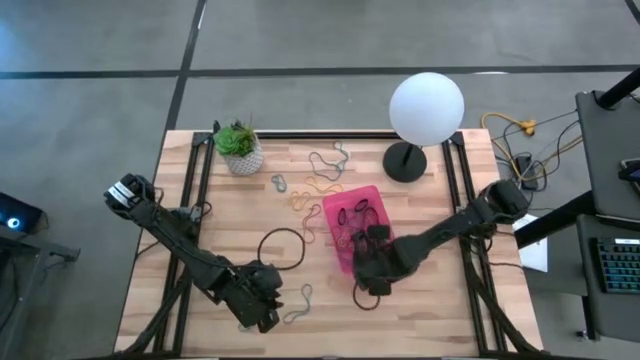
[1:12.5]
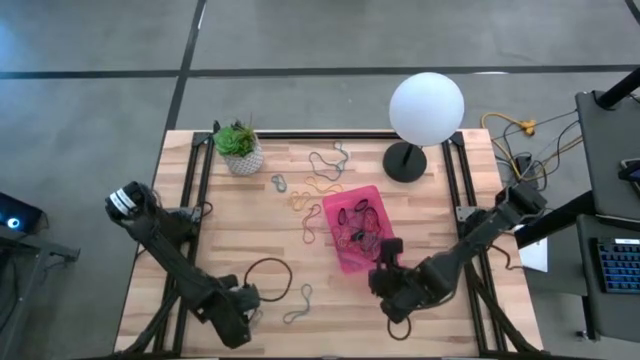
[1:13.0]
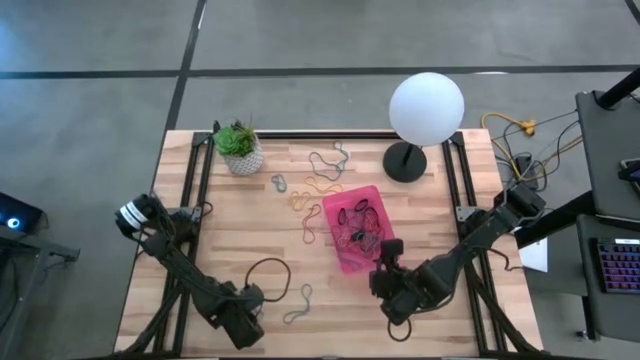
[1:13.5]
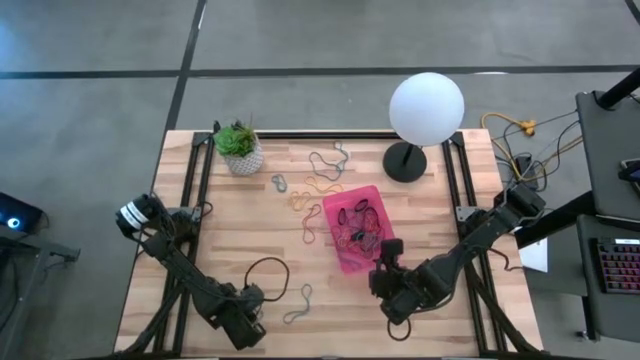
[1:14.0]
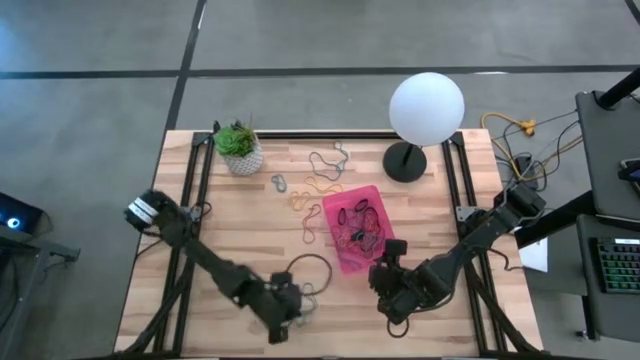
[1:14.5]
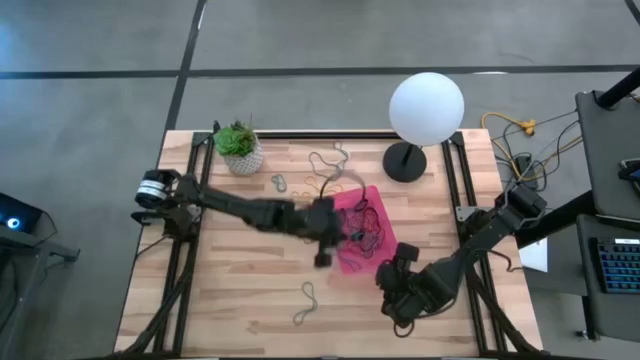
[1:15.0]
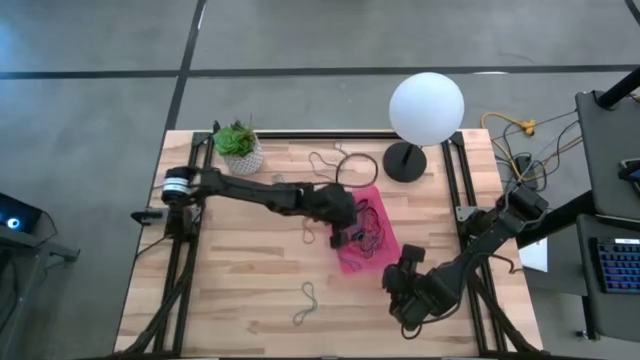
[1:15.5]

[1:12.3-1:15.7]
Task: Pick and place rubber bands into bin
Put the blue rubber band into the pink bin

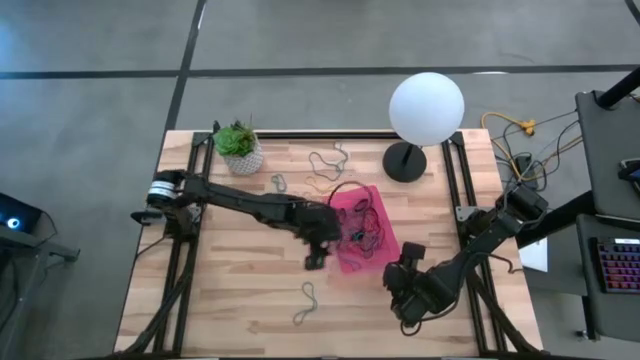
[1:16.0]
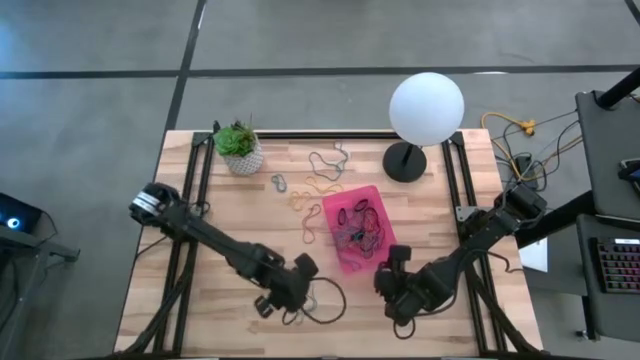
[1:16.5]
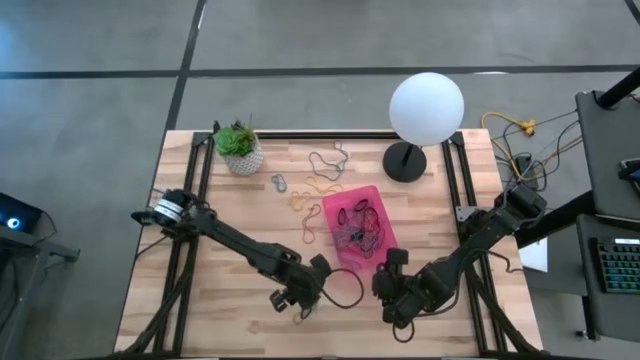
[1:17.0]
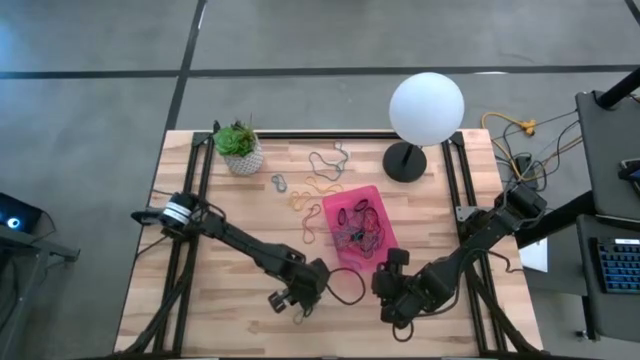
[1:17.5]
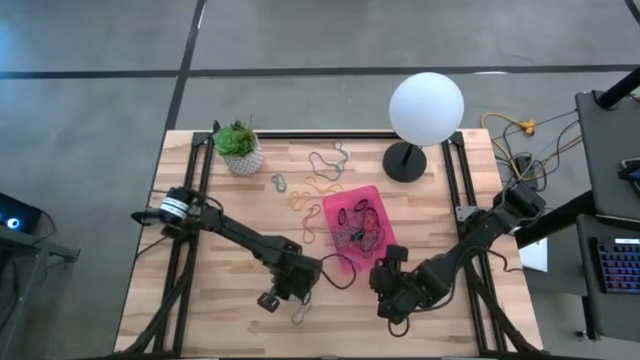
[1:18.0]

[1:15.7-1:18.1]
Put the blue rubber band into the pink bin

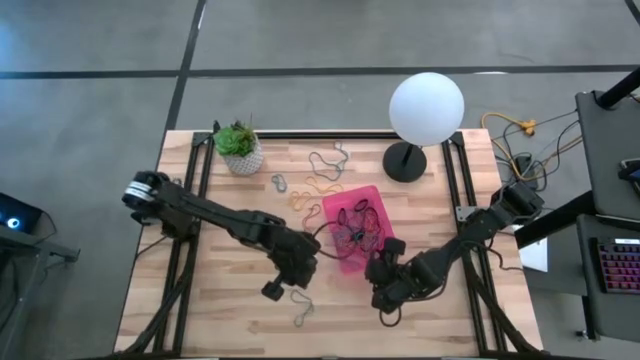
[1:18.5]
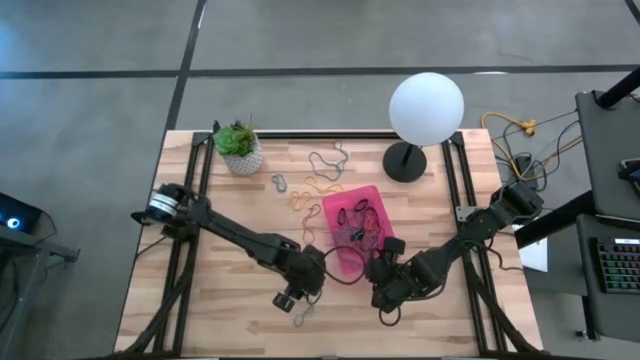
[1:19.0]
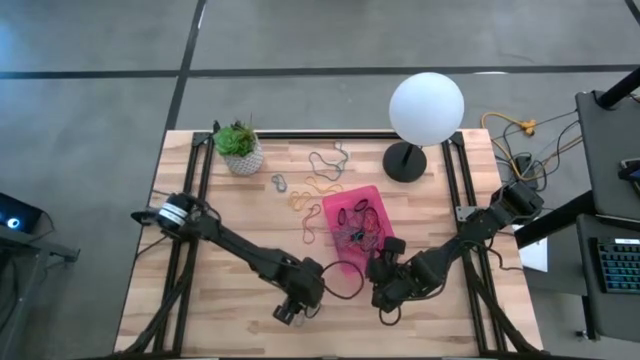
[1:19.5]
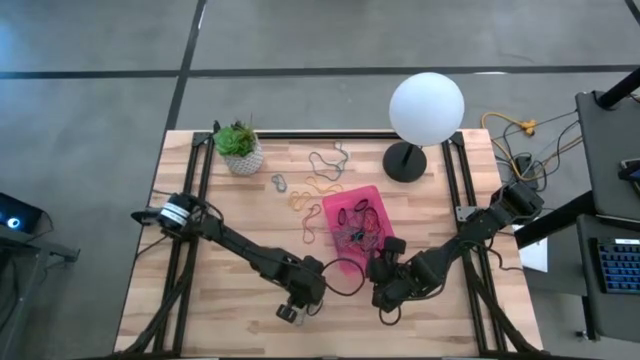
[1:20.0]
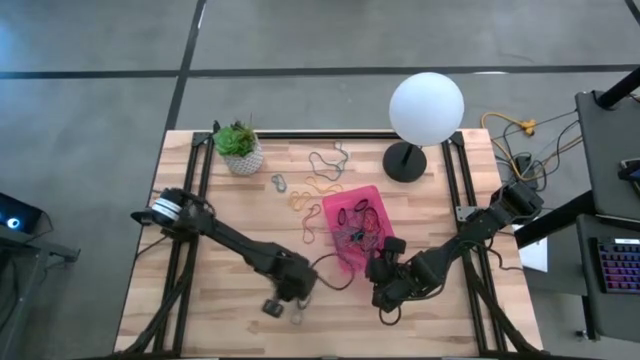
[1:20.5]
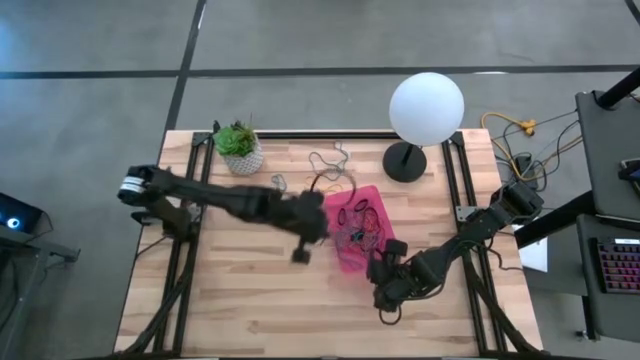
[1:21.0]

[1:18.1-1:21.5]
Put the blue rubber band into the pink bin

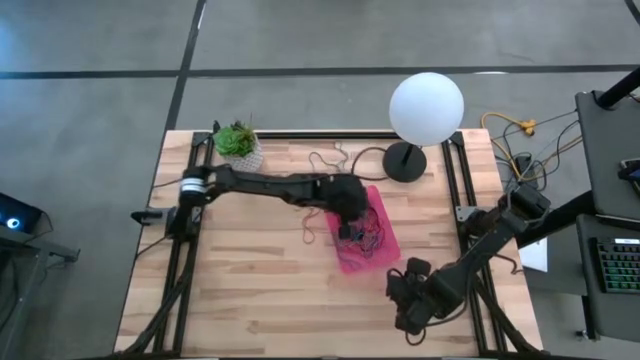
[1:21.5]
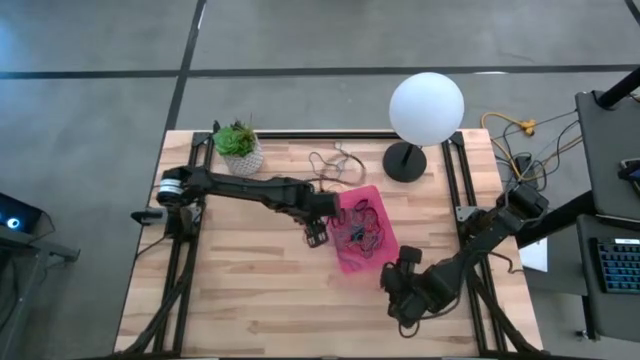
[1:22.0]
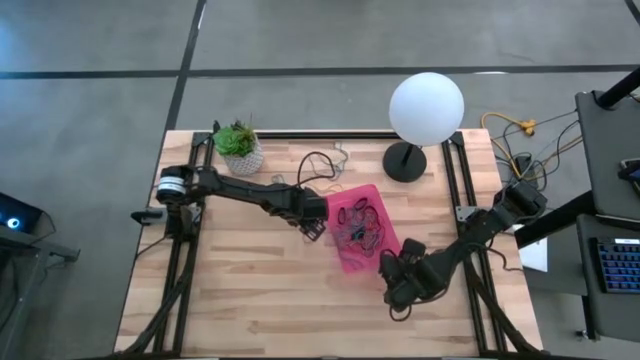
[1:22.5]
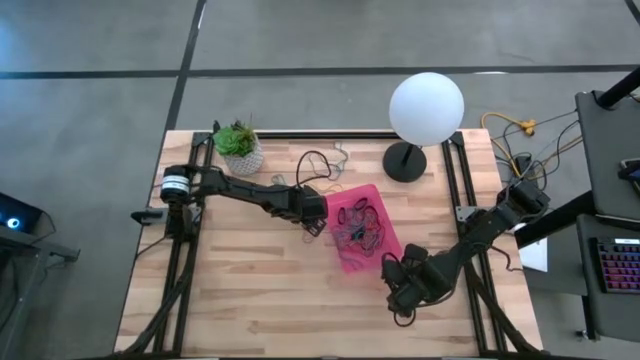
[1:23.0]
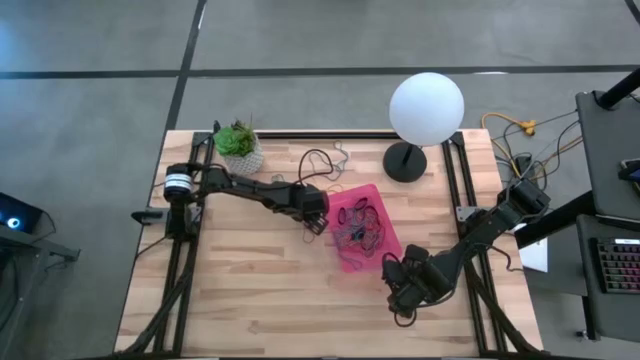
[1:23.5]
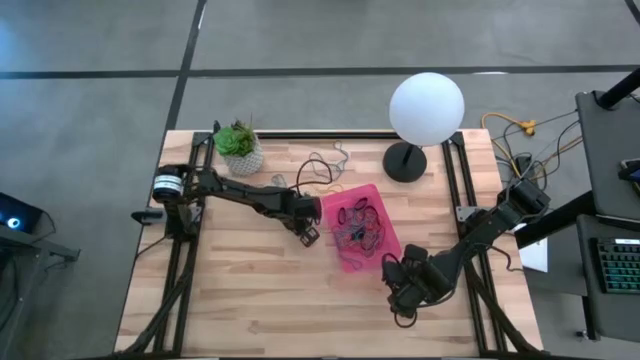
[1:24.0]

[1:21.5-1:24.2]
Put the red rubber band into the pink bin

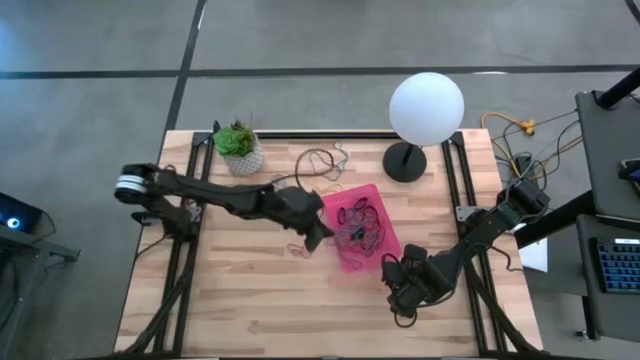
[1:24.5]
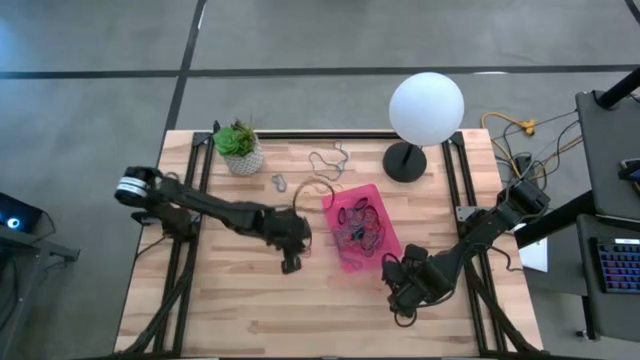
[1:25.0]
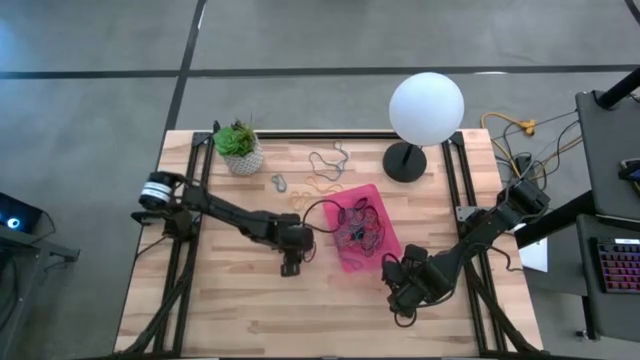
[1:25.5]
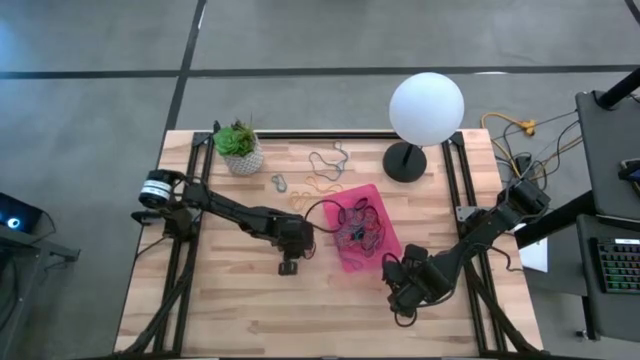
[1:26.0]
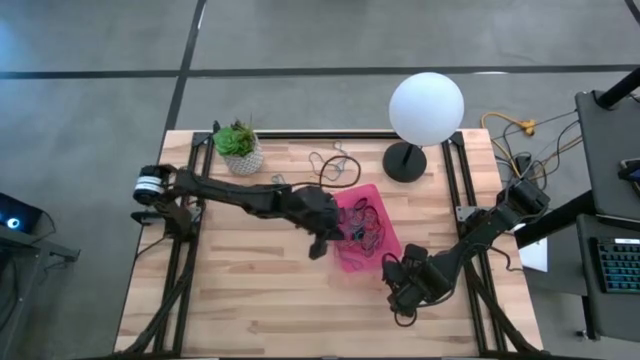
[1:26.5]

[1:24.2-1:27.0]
Put the red rubber band into the pink bin

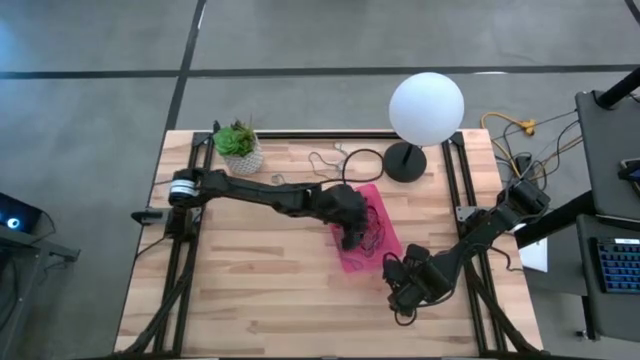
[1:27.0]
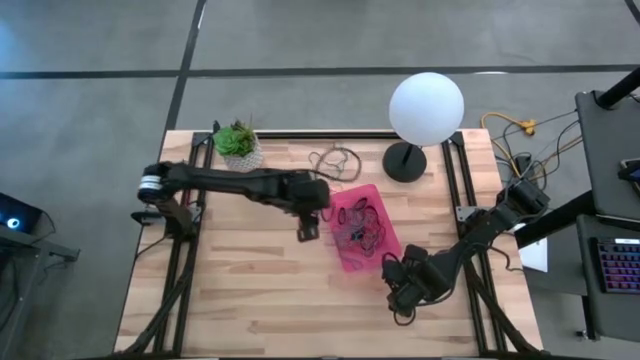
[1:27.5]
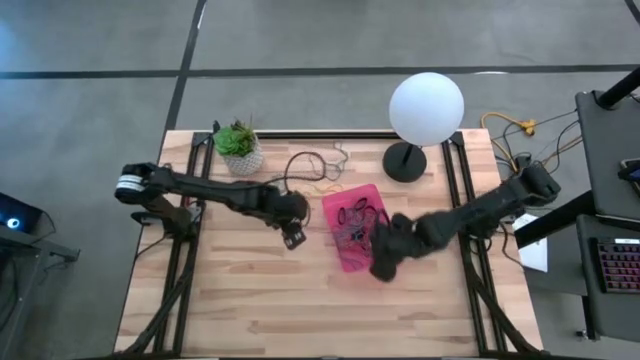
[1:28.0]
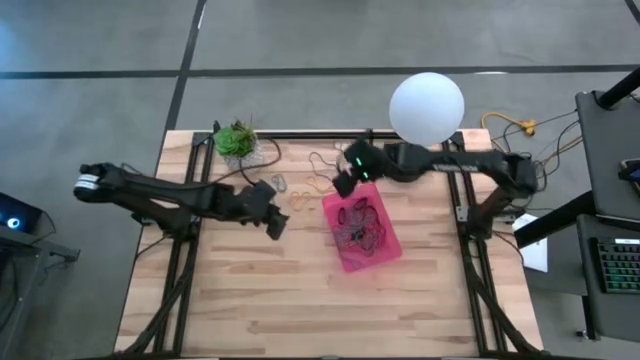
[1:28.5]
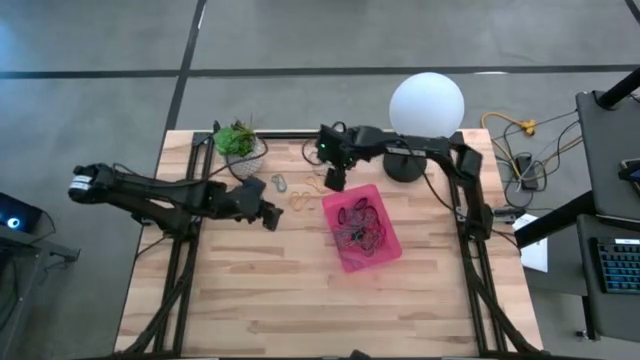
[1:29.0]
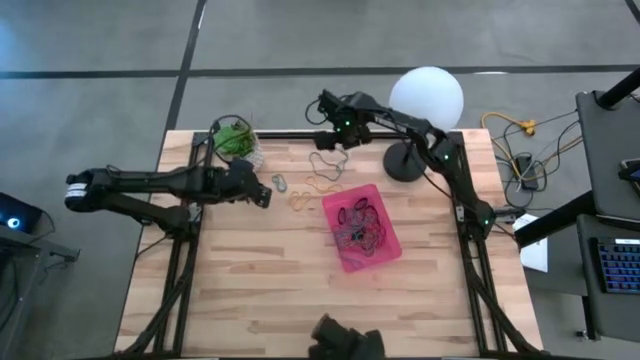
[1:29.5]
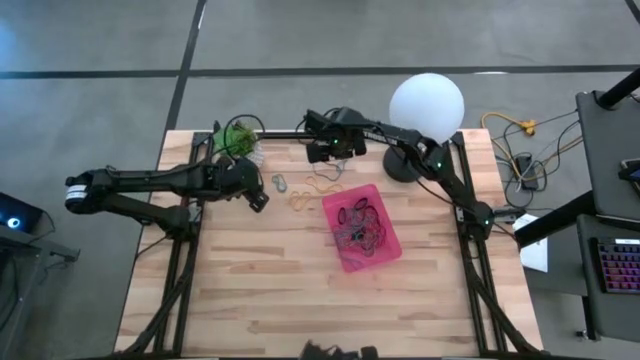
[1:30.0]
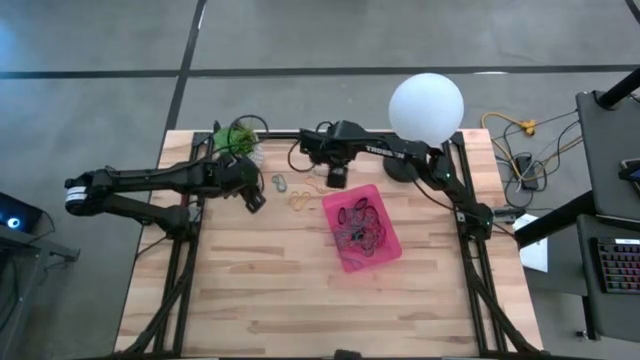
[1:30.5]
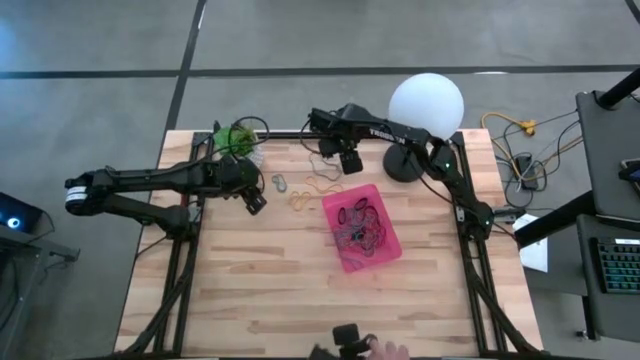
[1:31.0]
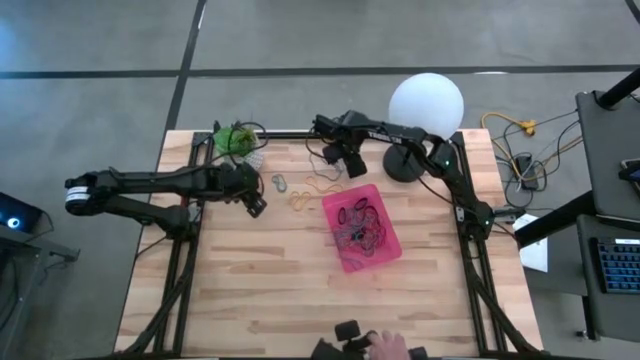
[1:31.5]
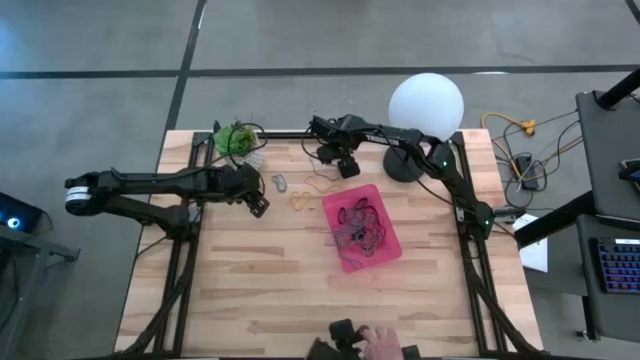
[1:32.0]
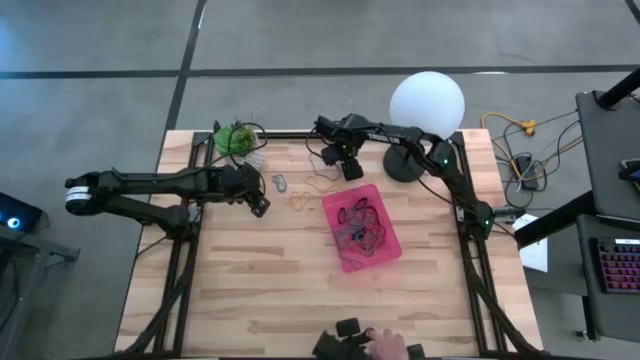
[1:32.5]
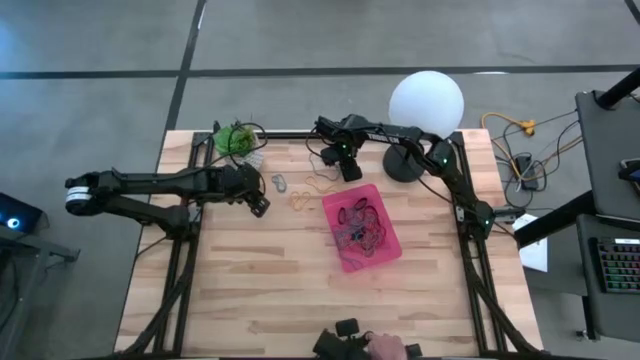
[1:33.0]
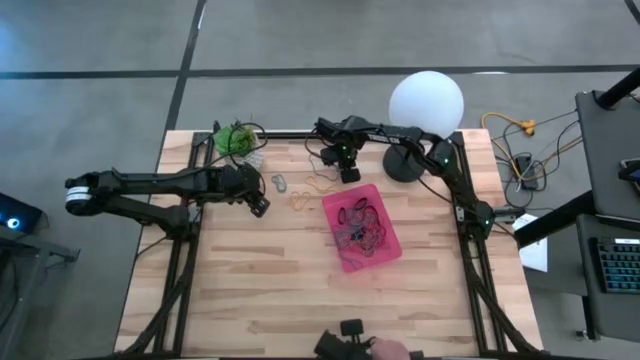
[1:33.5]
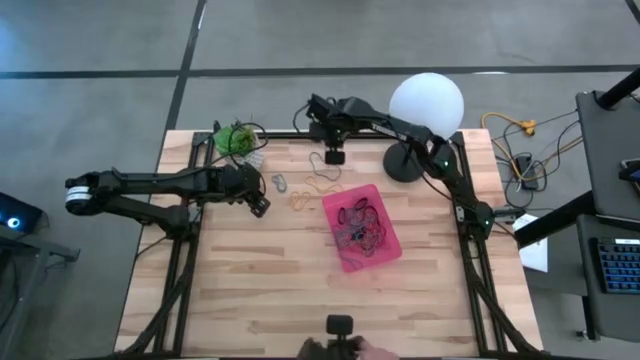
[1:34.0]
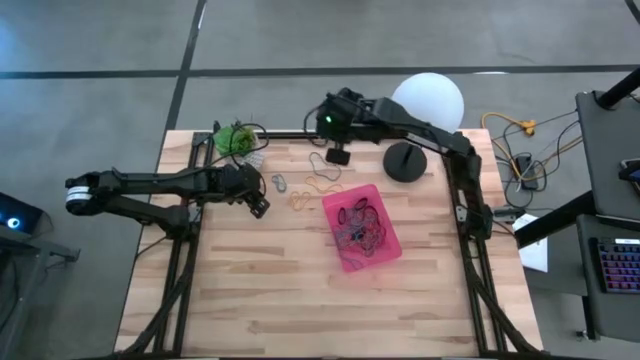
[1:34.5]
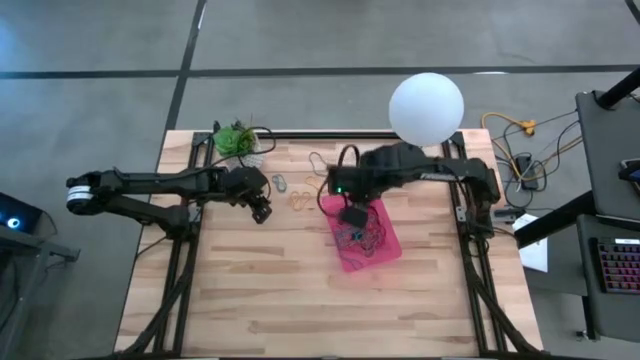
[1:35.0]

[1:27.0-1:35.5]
Put the blue rubber band into the pink bin
